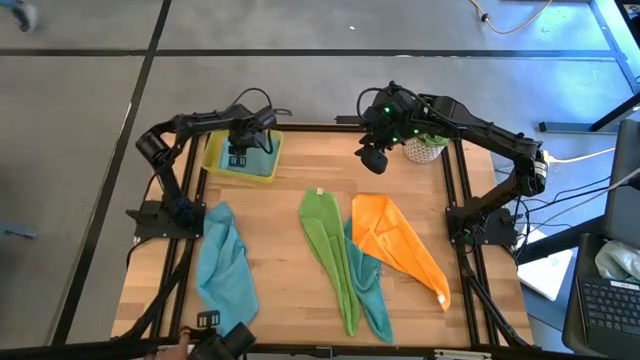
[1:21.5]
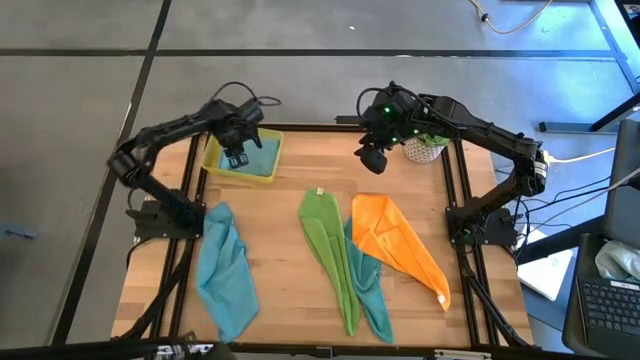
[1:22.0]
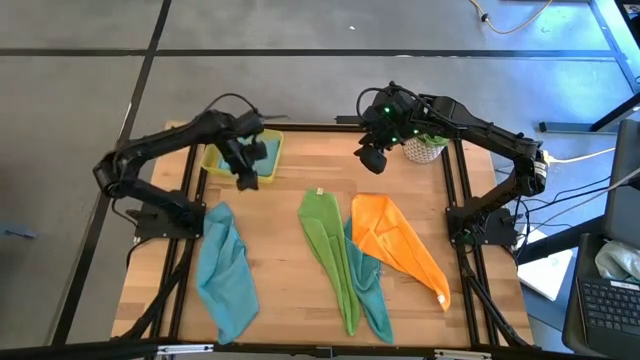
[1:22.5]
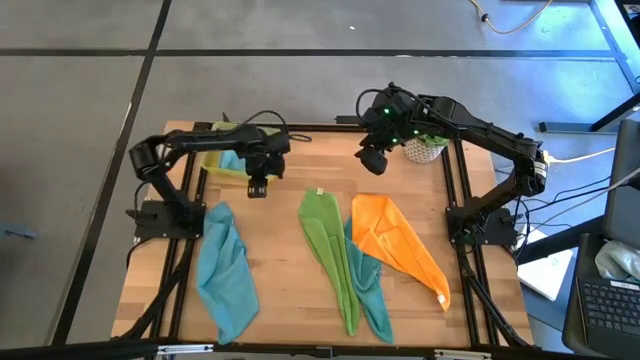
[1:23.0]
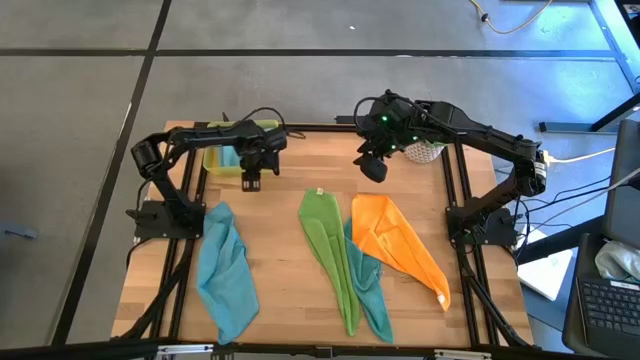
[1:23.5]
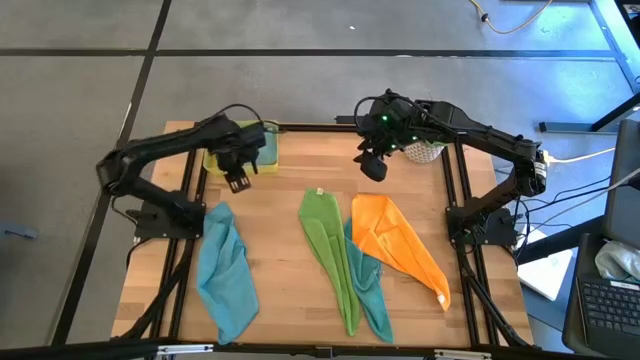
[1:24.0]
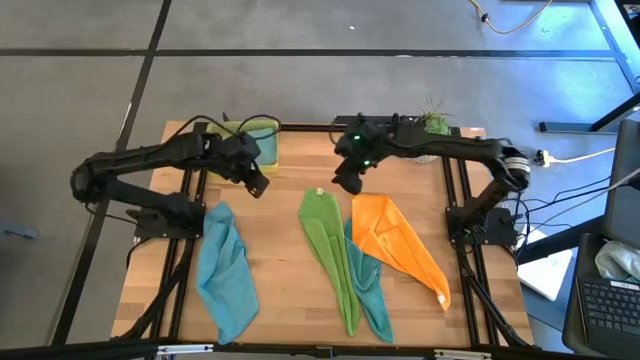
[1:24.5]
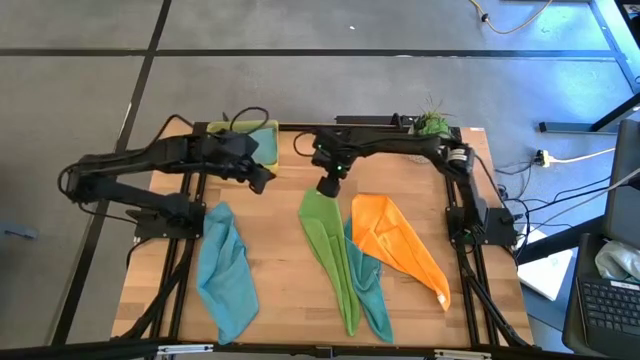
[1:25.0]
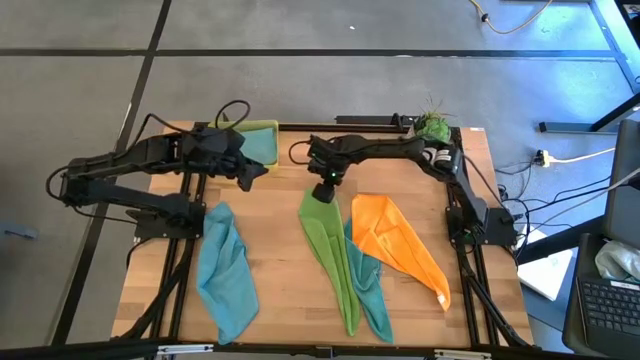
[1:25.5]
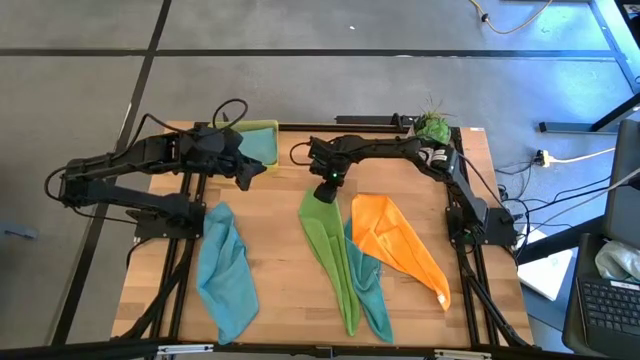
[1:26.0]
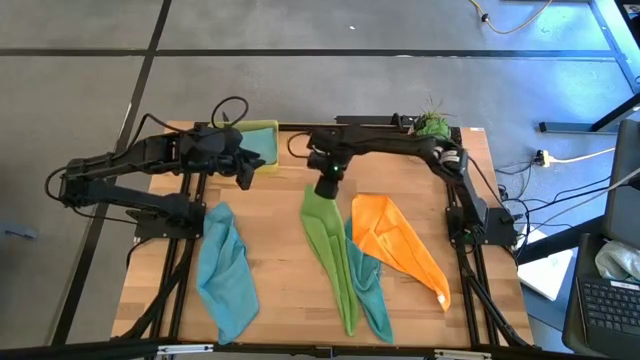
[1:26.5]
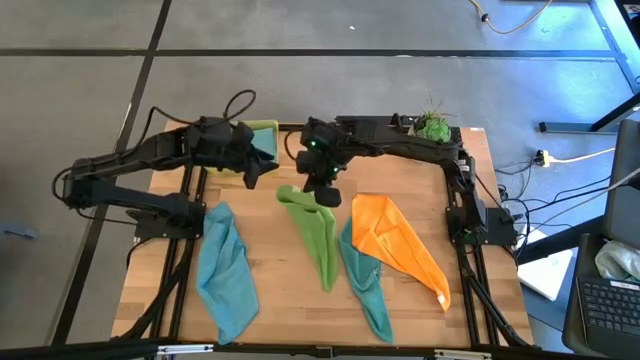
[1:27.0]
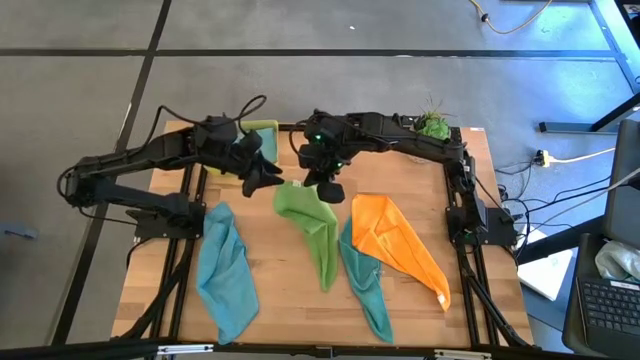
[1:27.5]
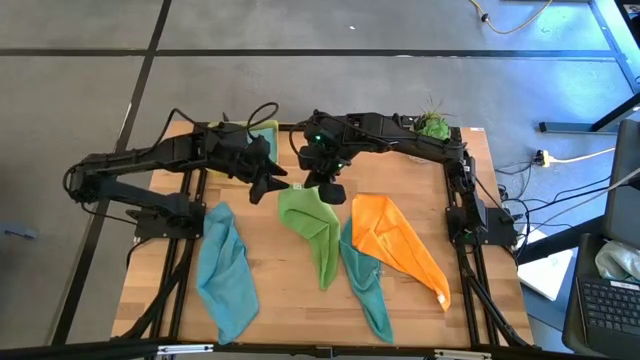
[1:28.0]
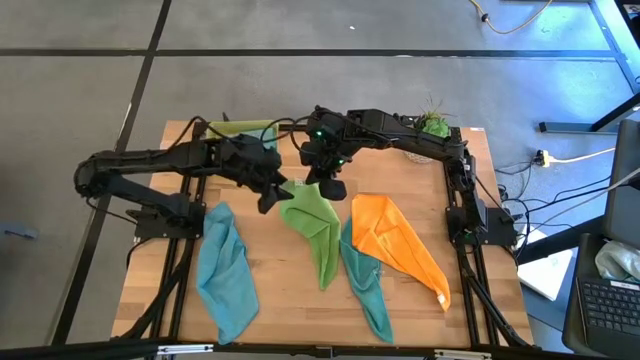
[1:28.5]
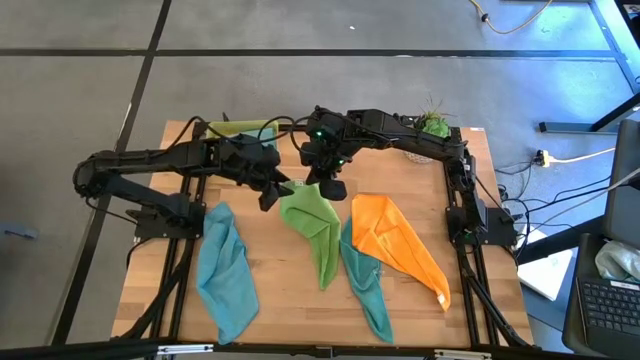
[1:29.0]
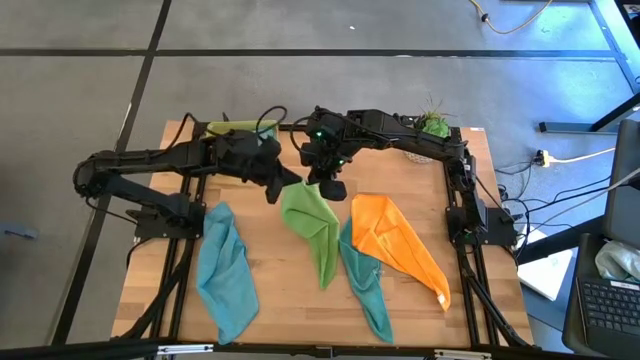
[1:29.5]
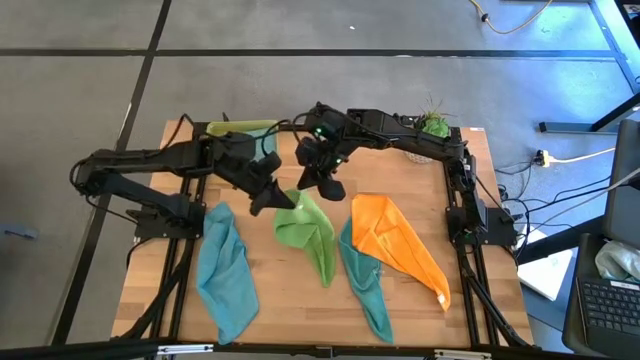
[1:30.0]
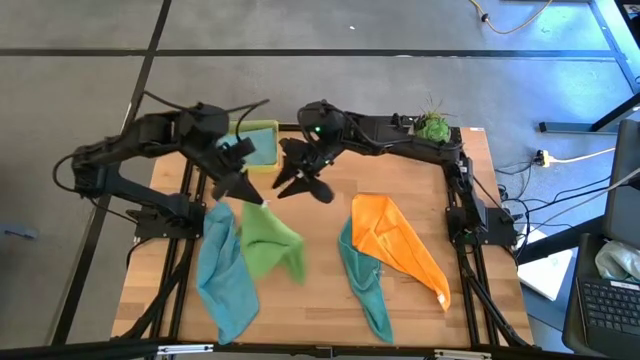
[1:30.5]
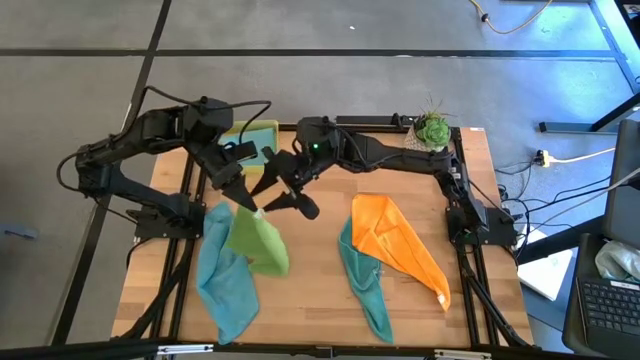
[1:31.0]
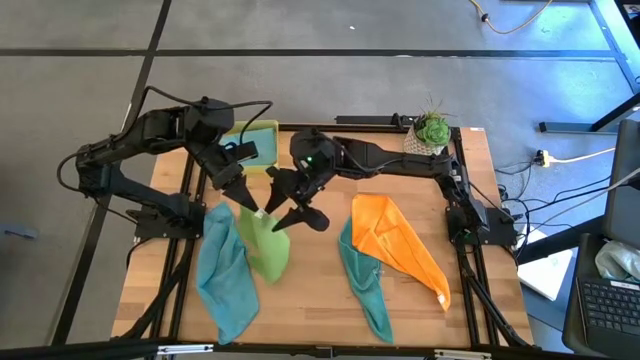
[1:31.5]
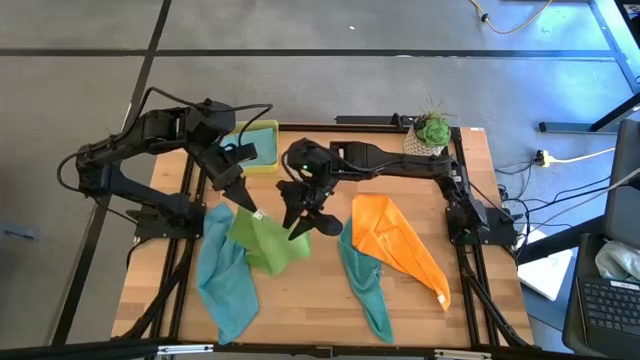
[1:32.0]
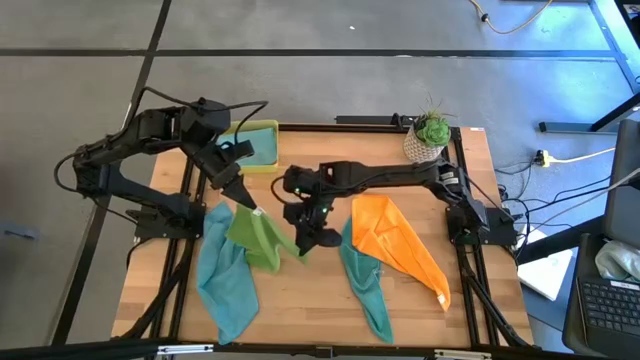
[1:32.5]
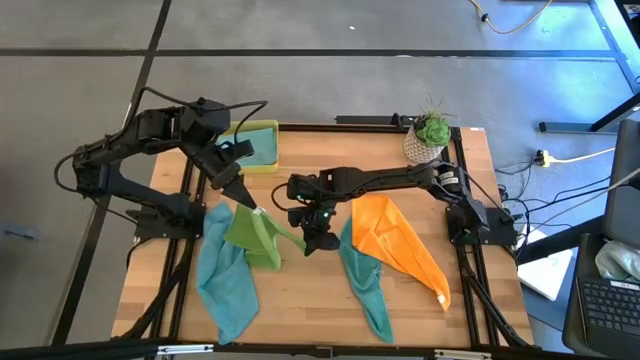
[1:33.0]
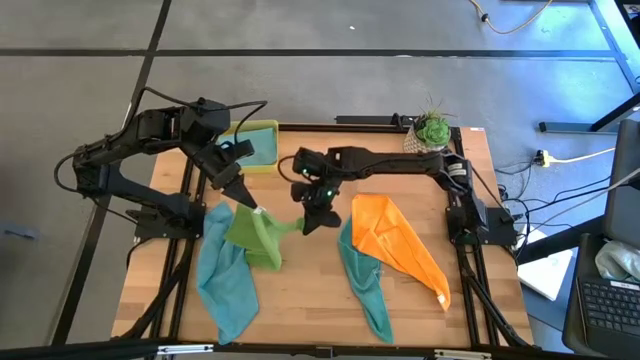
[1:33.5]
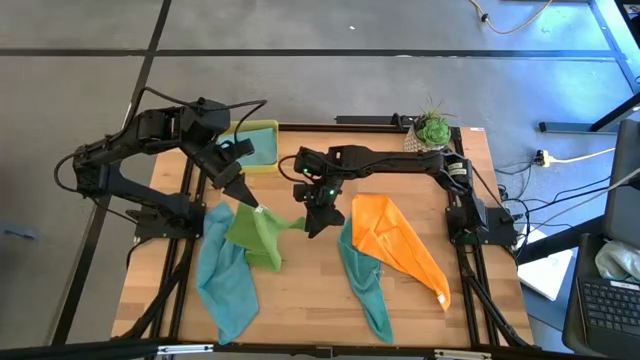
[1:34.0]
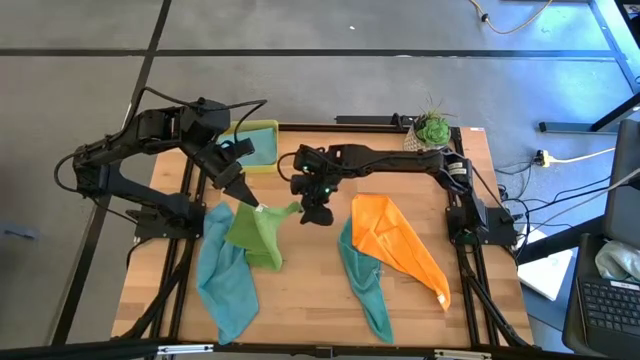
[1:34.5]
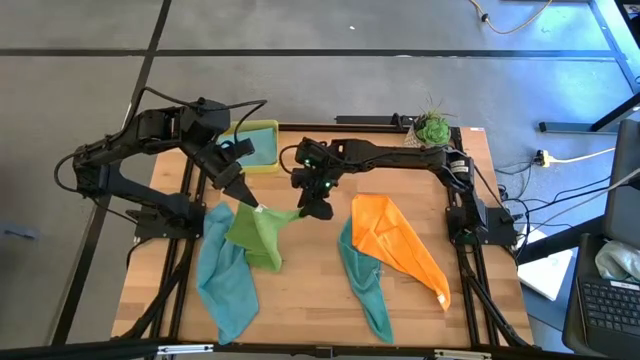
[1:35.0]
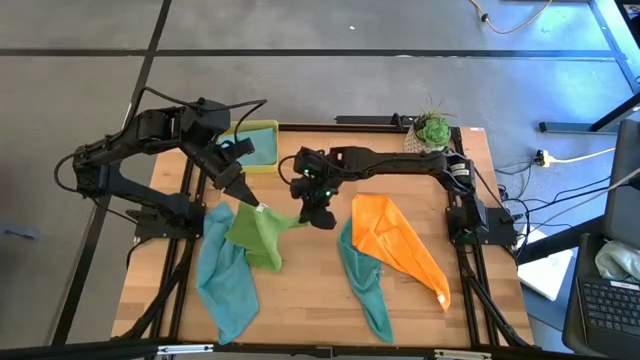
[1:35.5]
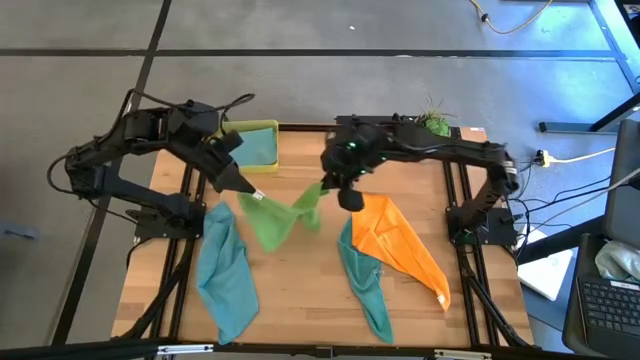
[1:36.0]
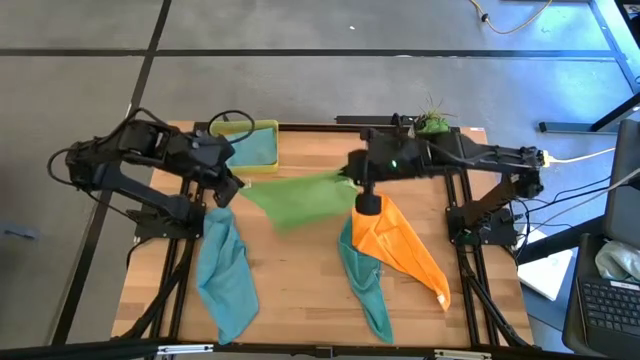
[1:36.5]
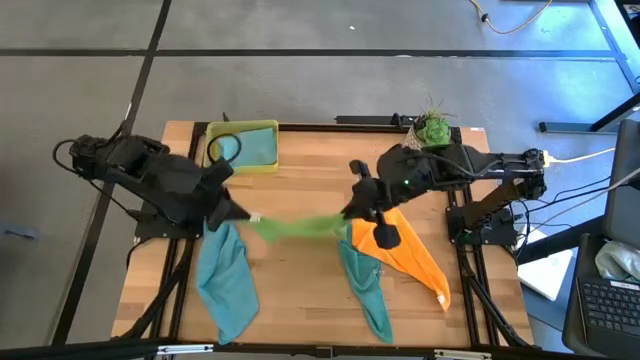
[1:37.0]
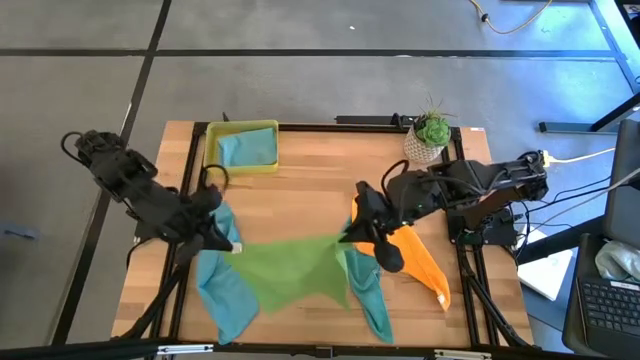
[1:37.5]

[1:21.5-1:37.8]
Task: Fold microfiber towels
Fold the green towel

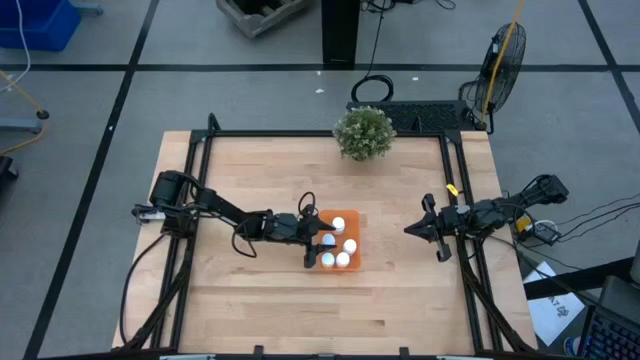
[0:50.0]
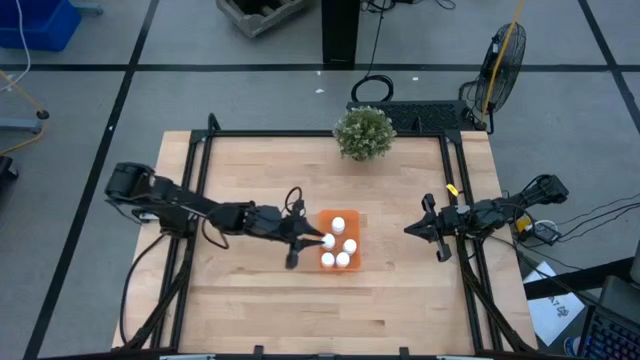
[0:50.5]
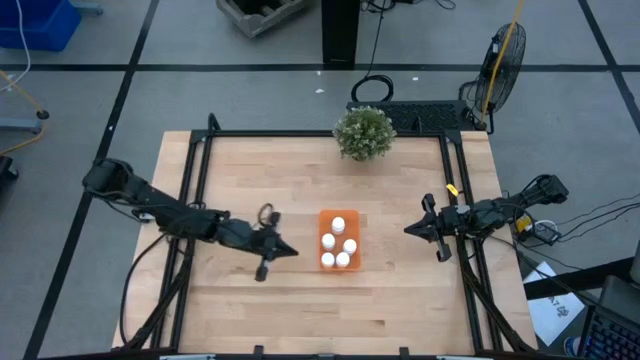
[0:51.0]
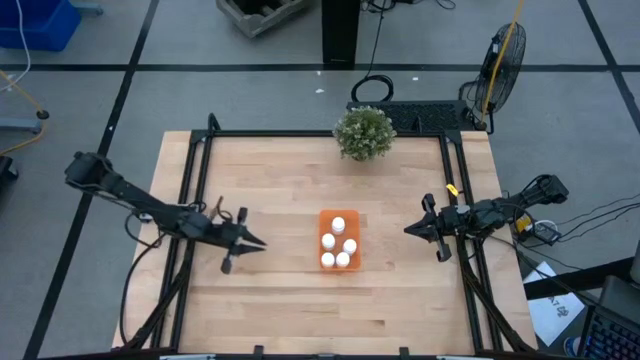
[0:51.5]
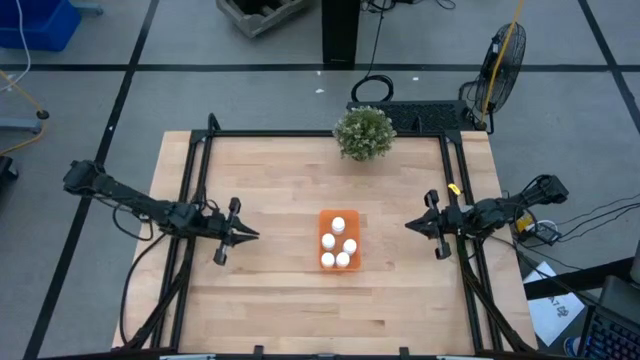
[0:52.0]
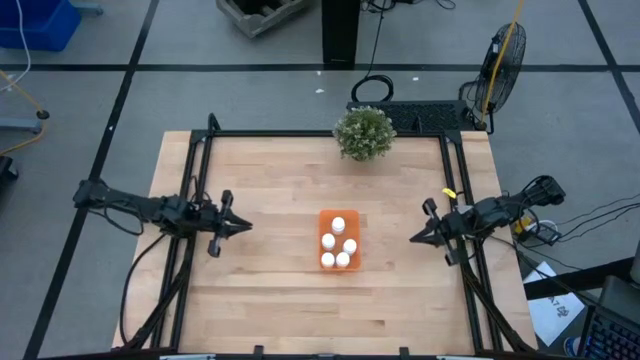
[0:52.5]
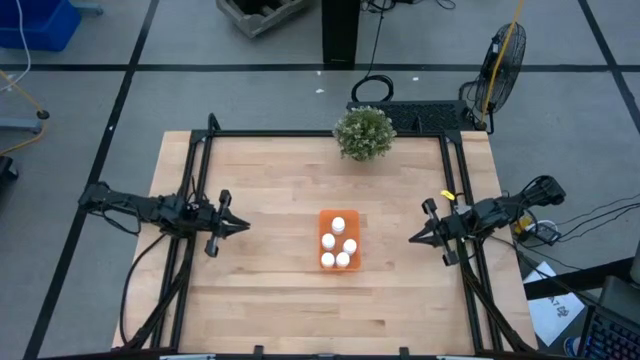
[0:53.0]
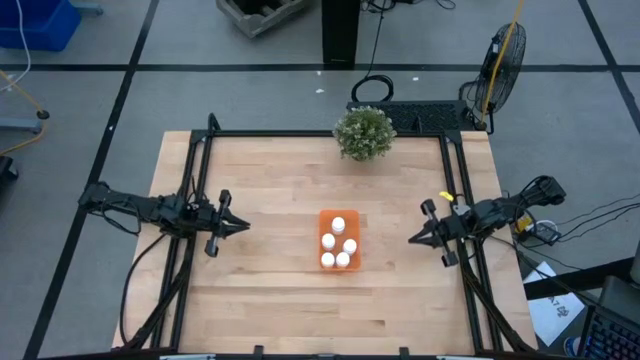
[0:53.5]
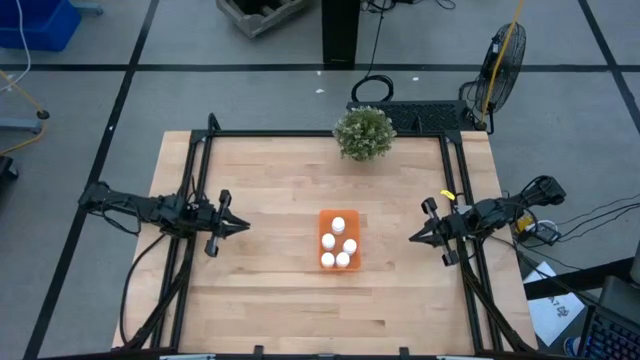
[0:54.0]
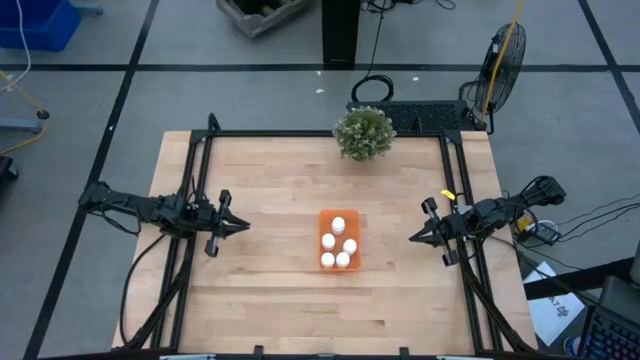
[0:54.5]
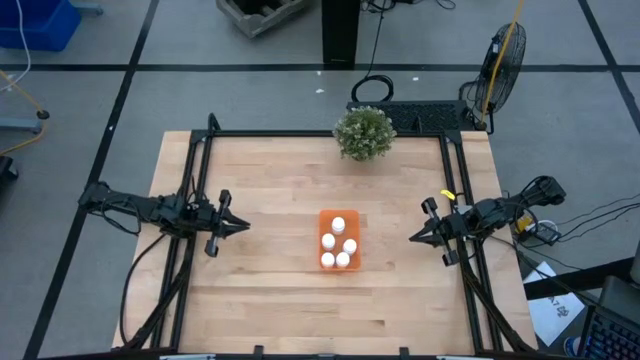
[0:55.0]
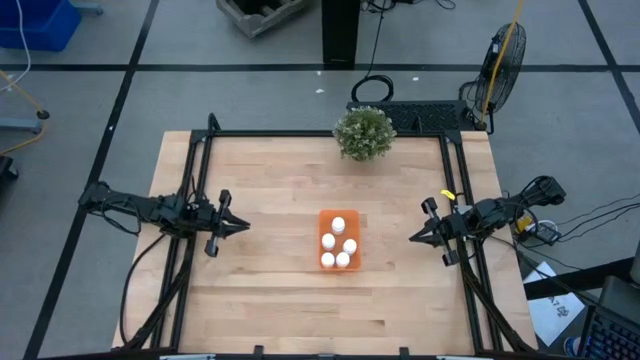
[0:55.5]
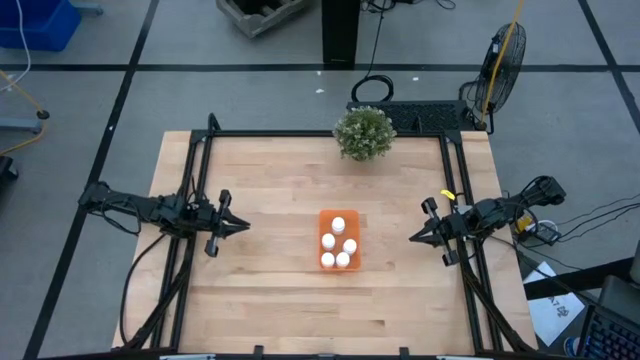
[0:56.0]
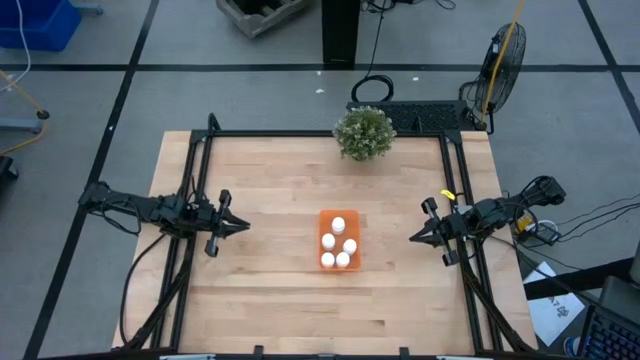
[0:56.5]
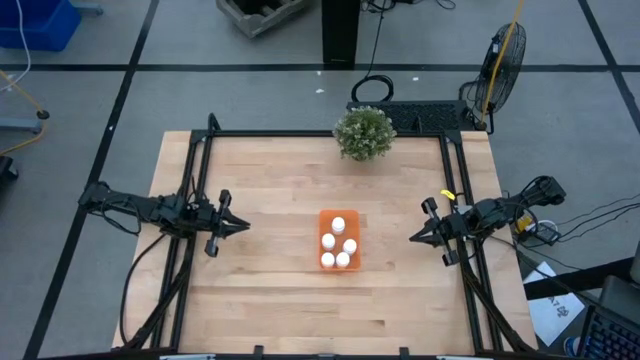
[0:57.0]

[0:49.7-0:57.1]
Task: Pick and place pill bottles into a basket
Return to Home Position
